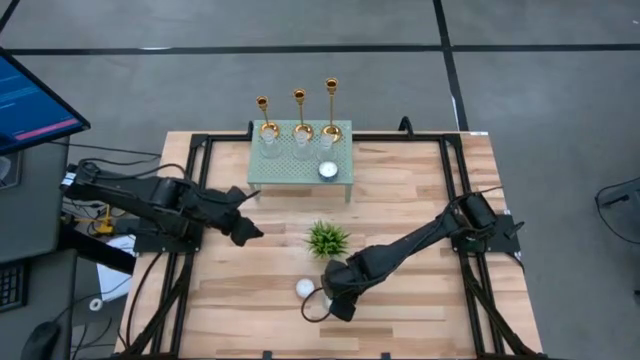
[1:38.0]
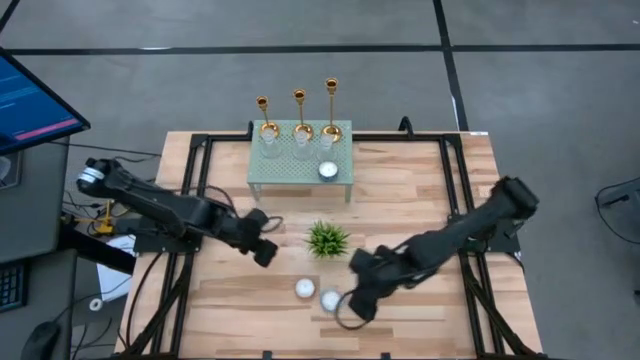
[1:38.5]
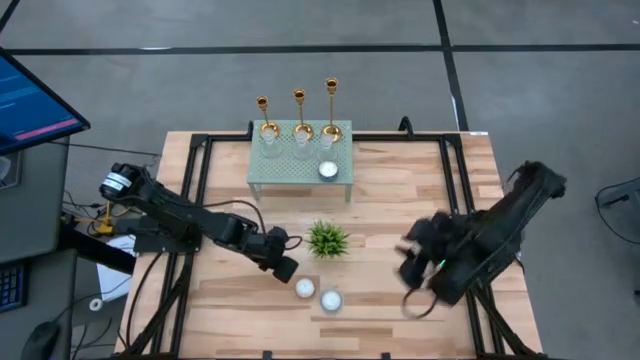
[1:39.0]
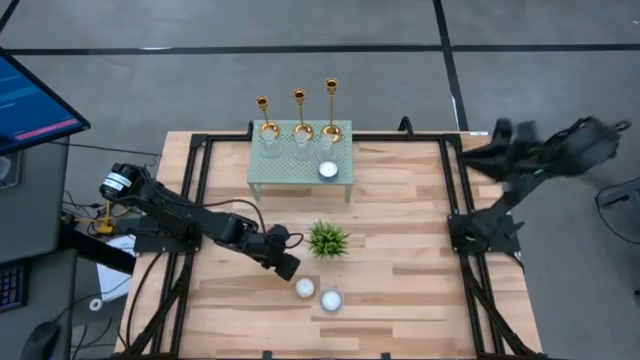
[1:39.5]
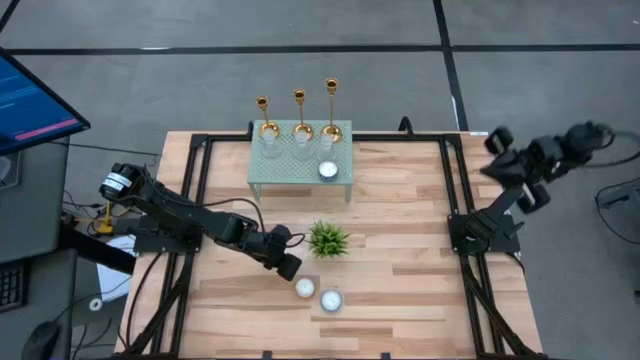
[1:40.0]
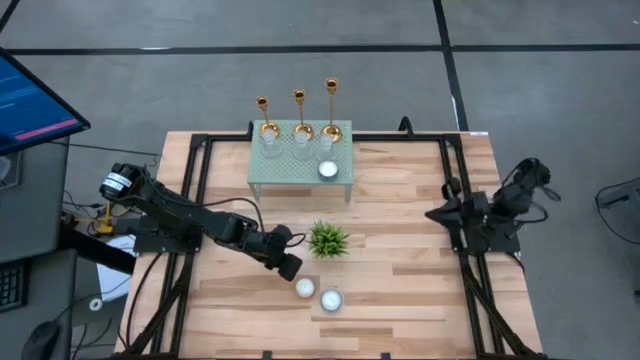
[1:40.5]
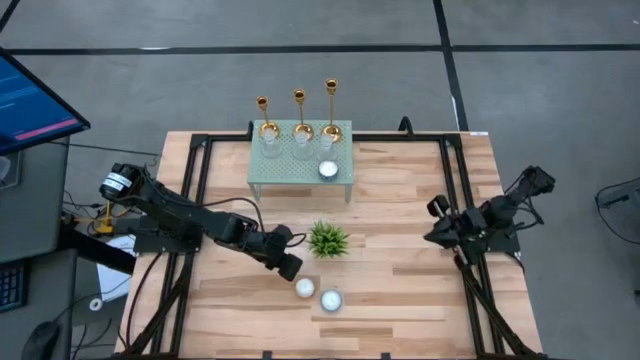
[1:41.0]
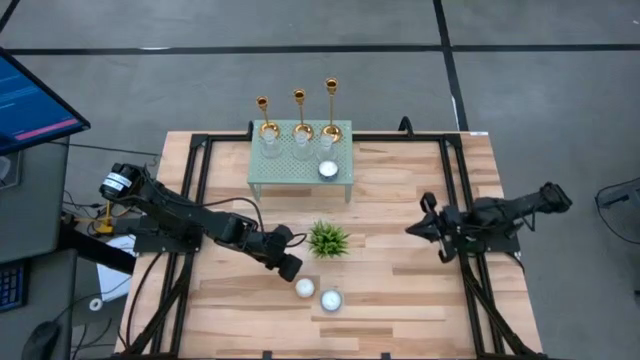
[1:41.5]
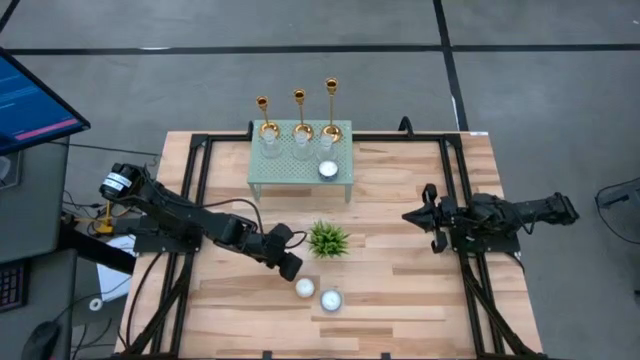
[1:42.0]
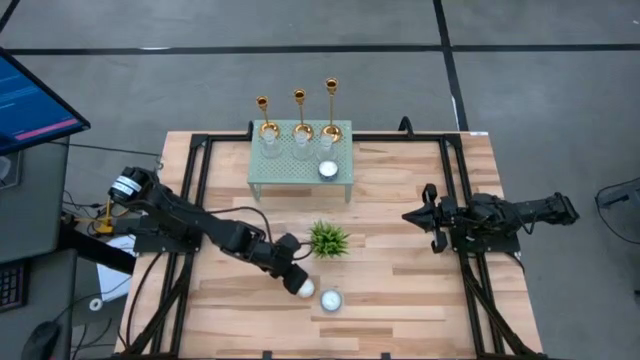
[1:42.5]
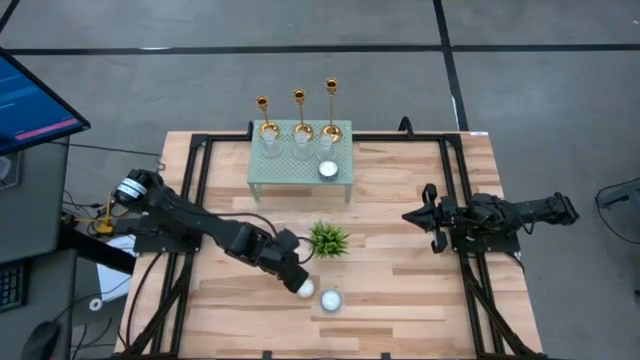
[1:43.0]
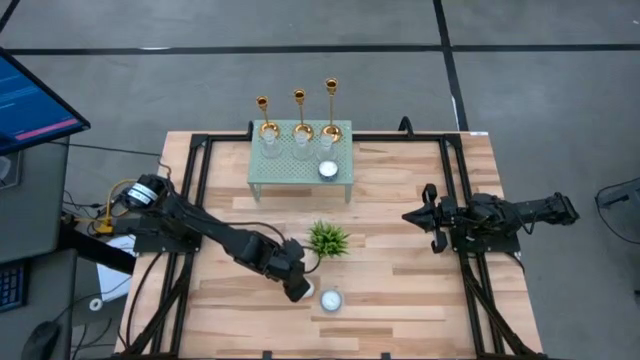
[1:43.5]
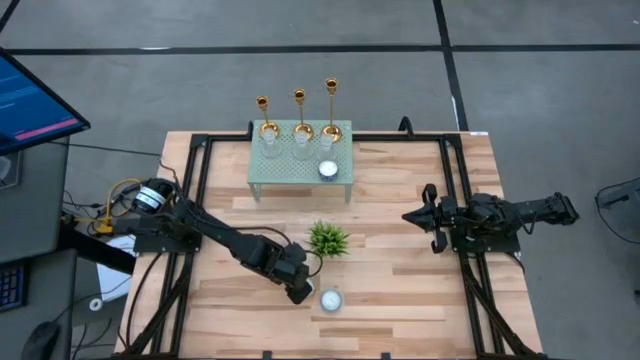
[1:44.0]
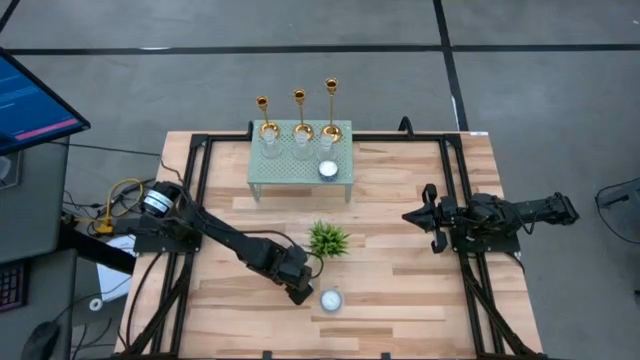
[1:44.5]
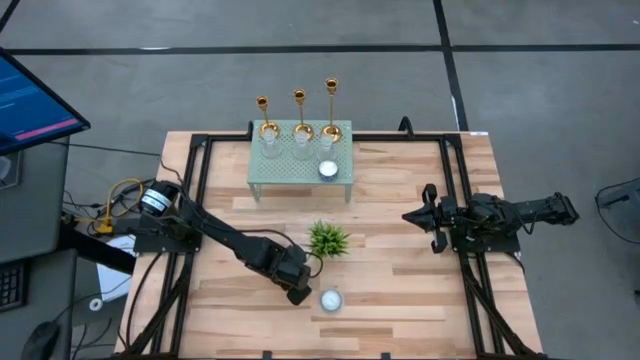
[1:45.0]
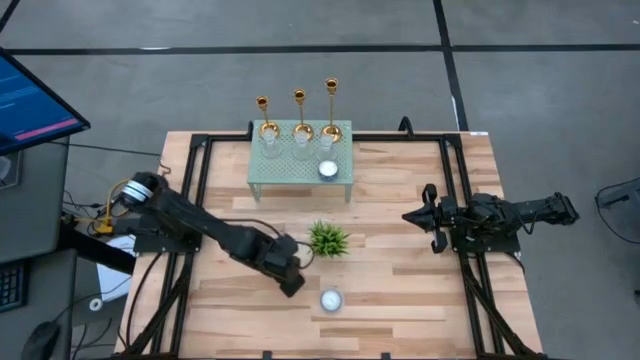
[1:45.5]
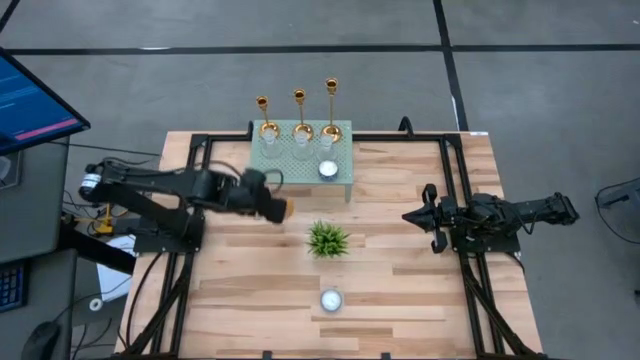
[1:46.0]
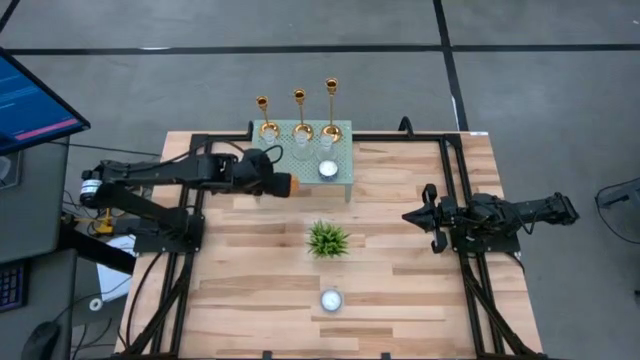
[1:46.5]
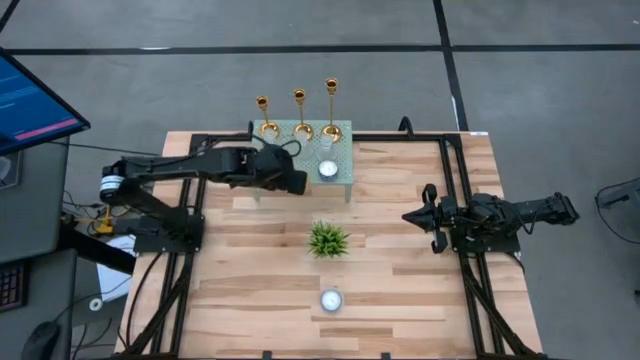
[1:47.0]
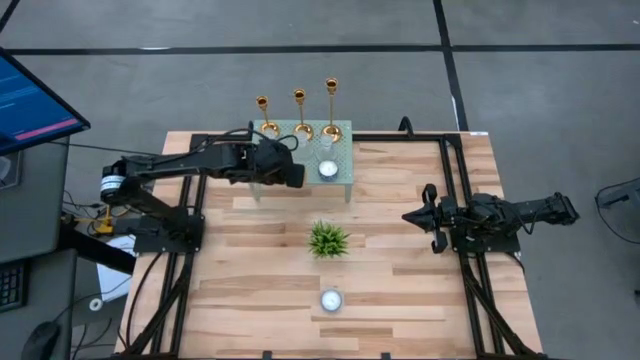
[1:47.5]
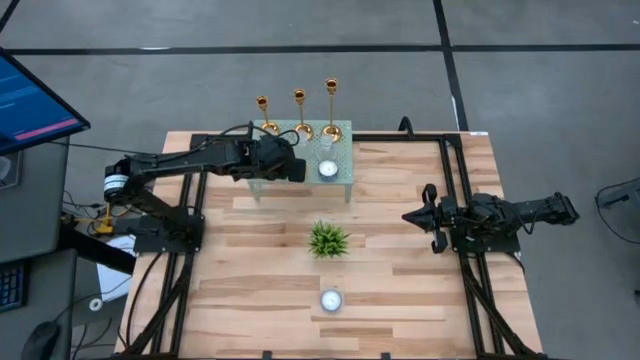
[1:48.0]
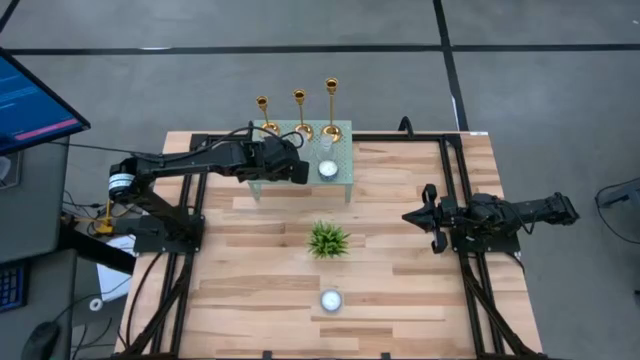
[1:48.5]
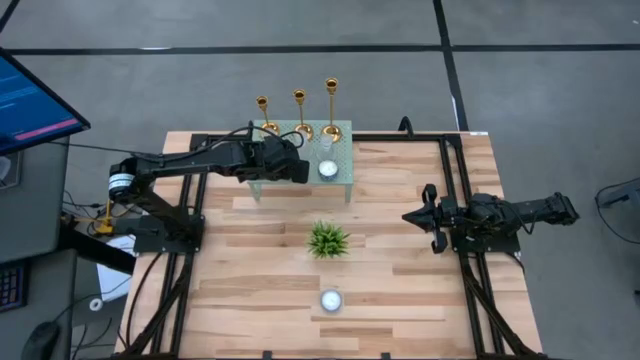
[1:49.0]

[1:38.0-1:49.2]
Task: Pick & Place candle stick holders
Put the orange scented candle on the shelf aligned with the other scented candle

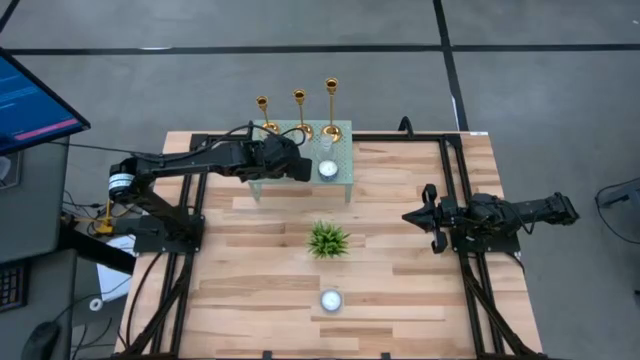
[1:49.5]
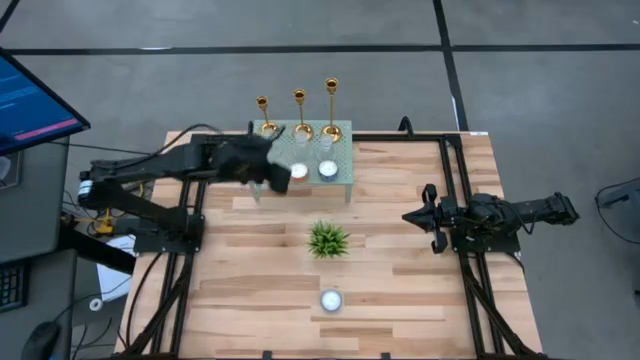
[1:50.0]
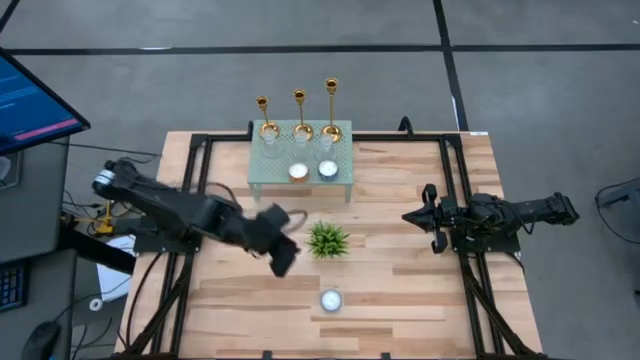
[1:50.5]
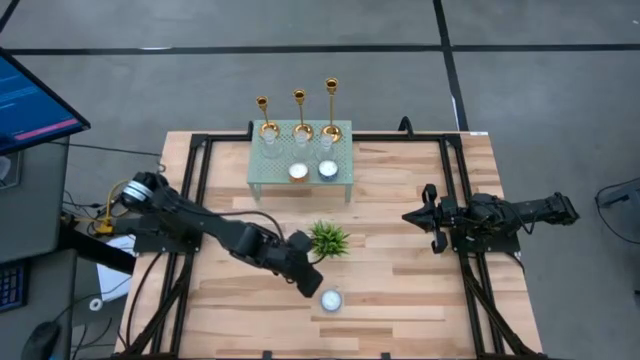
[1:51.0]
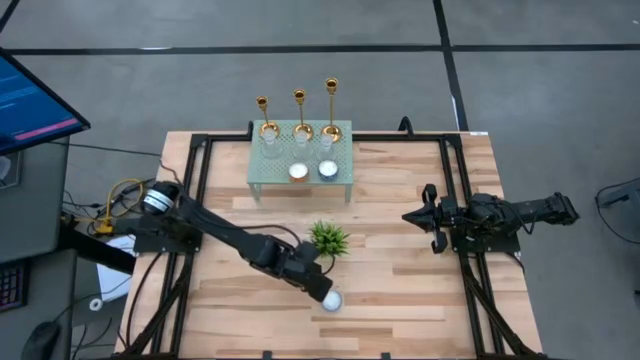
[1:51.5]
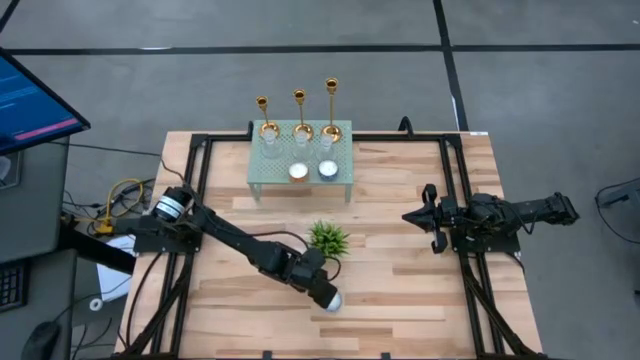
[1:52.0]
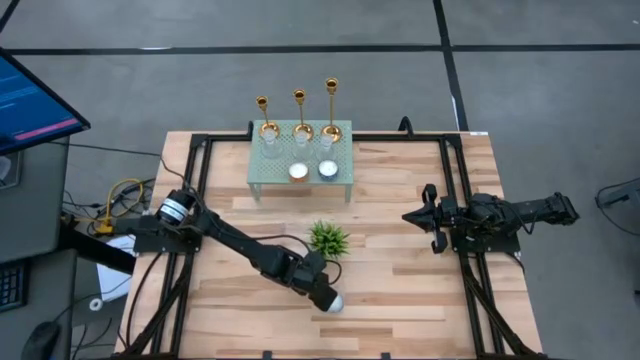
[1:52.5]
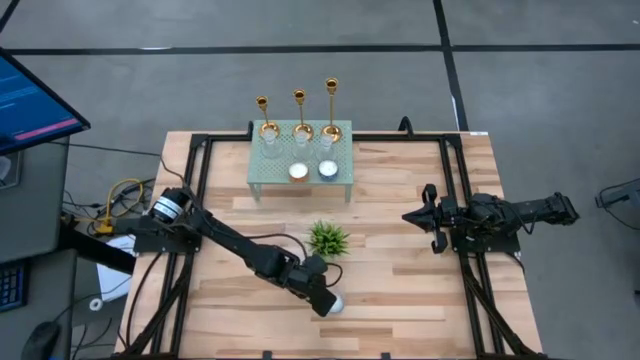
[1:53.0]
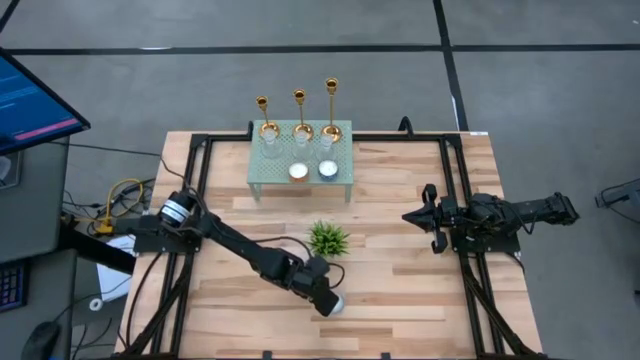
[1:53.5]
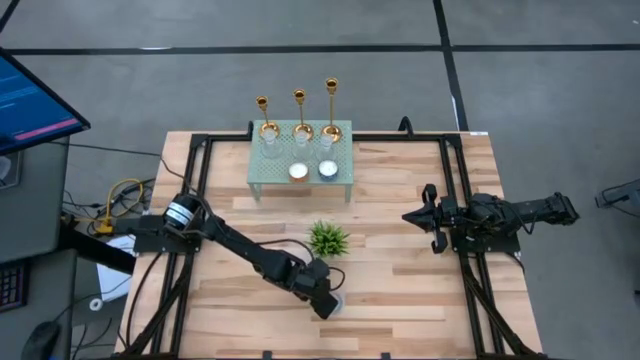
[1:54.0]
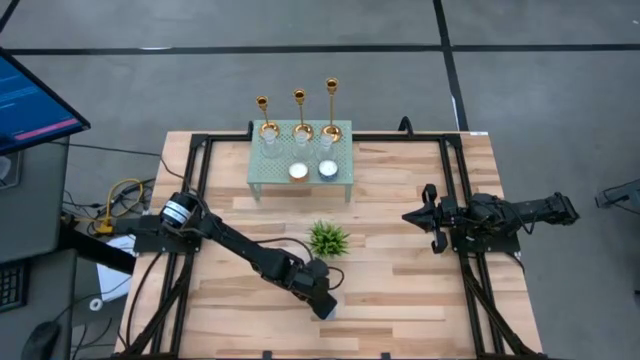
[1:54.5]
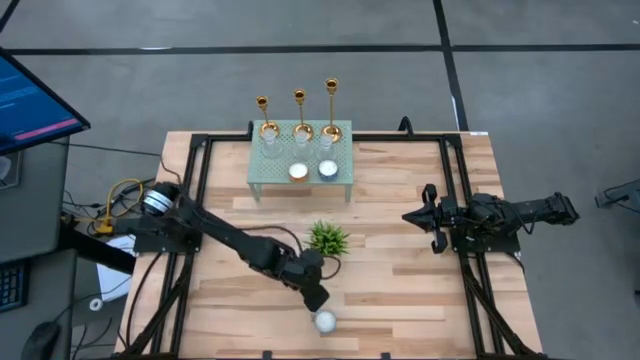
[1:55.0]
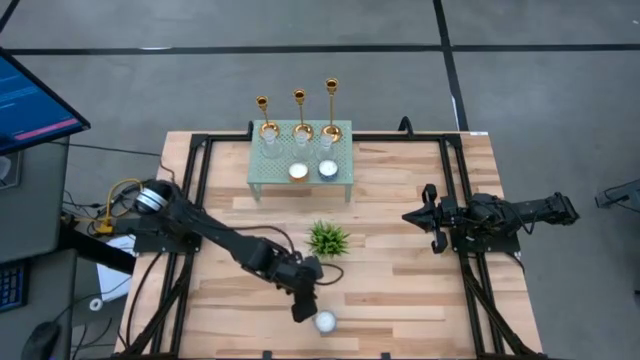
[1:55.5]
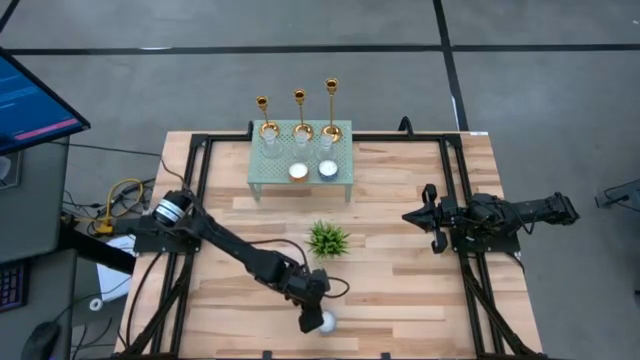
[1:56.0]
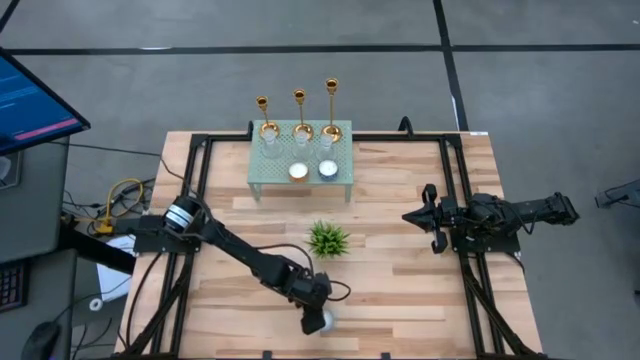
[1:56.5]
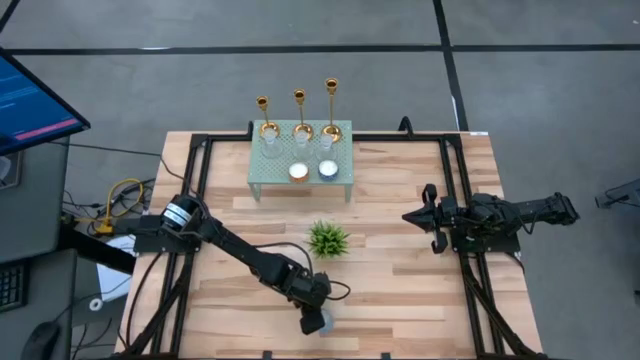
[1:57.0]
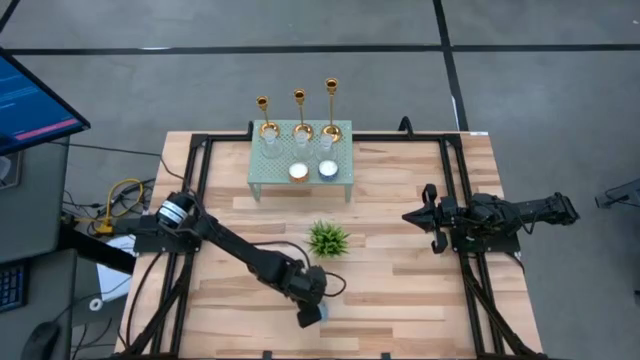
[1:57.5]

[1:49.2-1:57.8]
Put the light blue scented candle on the shelf aligned with the other scented candles

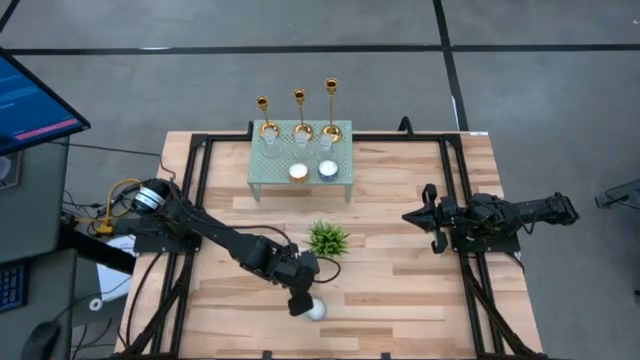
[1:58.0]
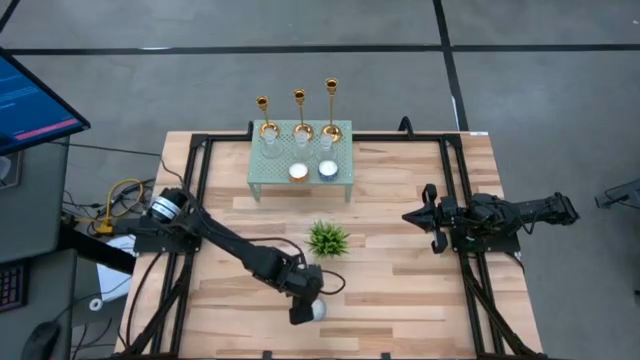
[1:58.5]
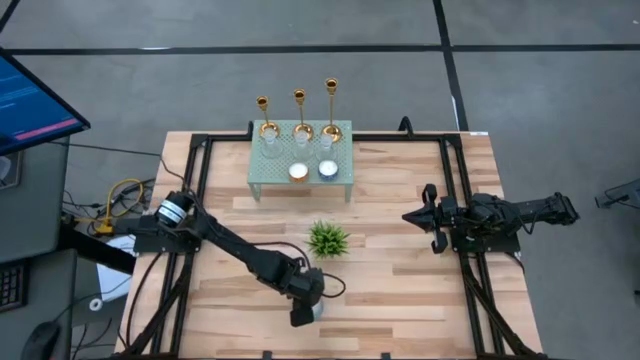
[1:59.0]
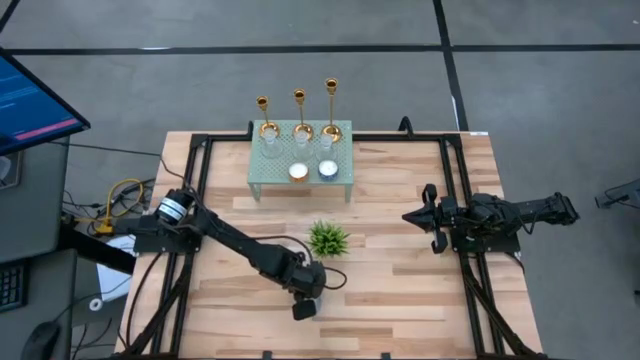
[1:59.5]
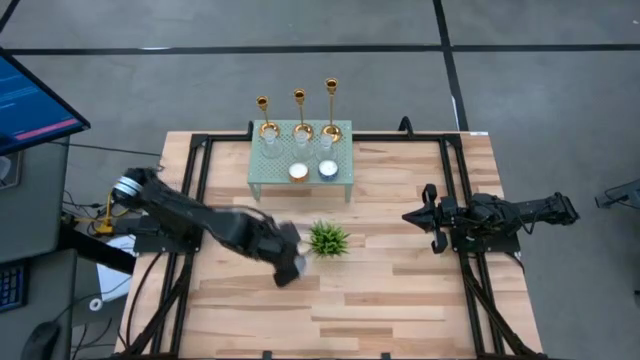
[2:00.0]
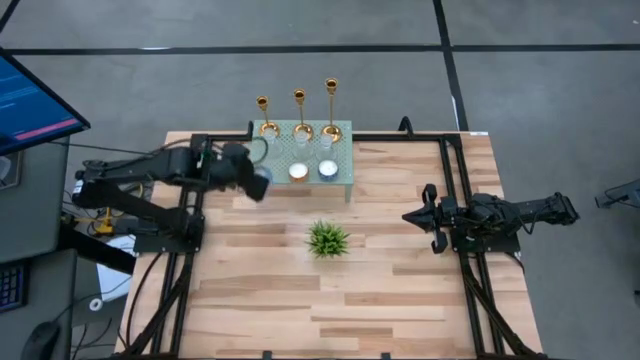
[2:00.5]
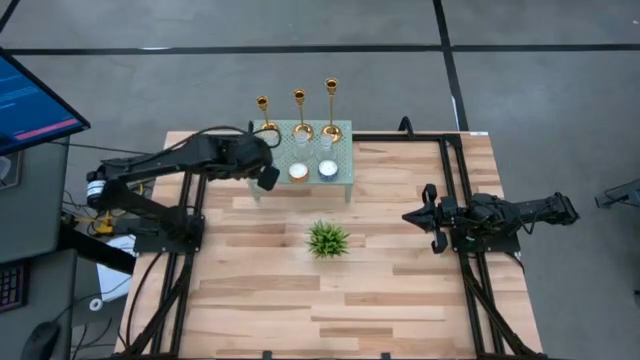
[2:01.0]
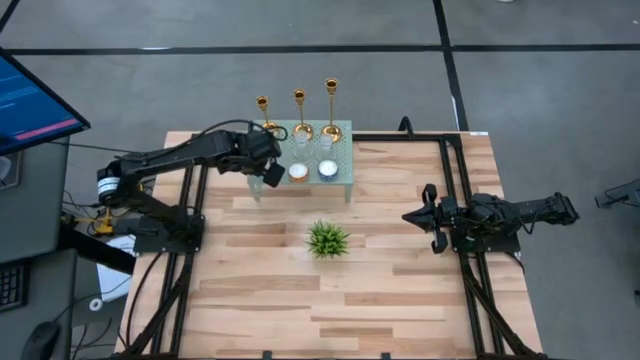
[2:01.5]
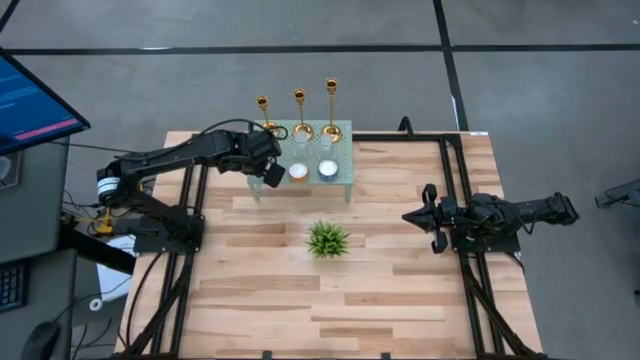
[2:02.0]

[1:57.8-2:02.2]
Put the light blue scented candle on the shelf aligned with the other scented candles
